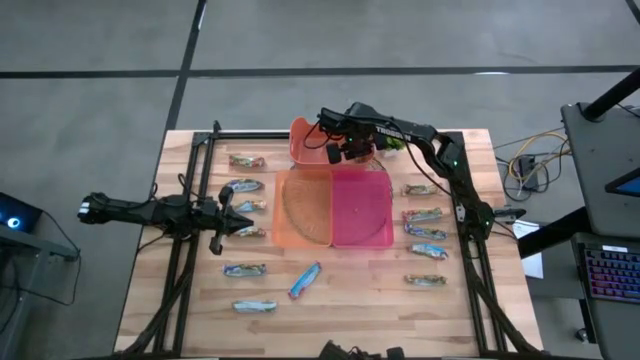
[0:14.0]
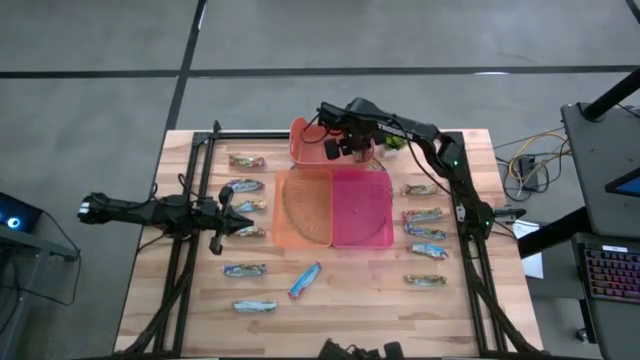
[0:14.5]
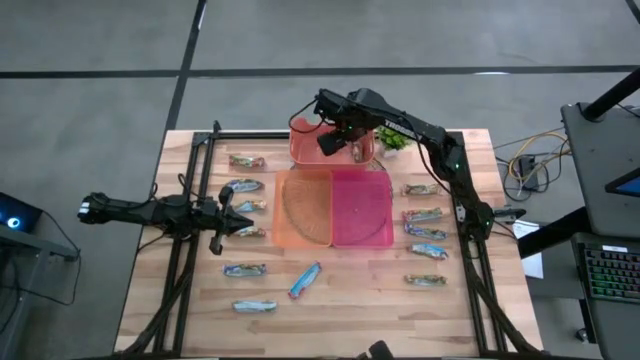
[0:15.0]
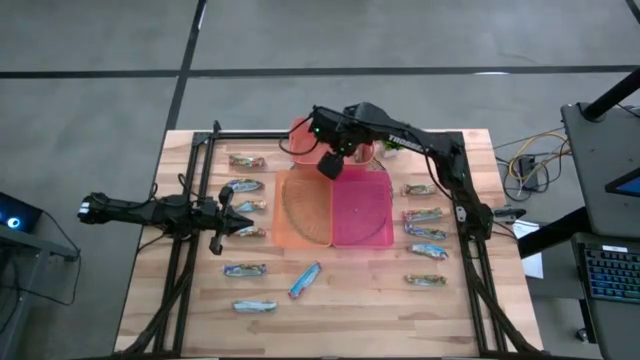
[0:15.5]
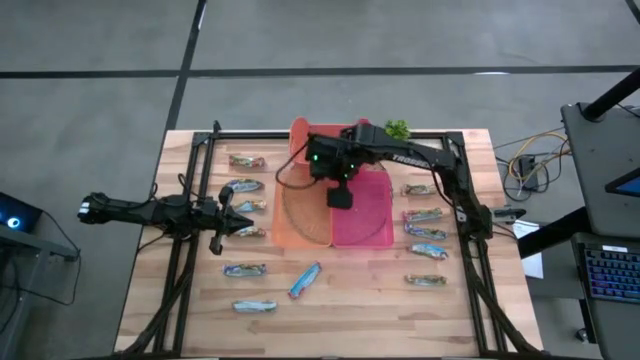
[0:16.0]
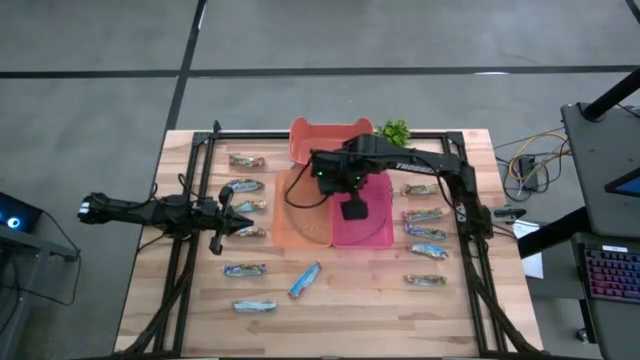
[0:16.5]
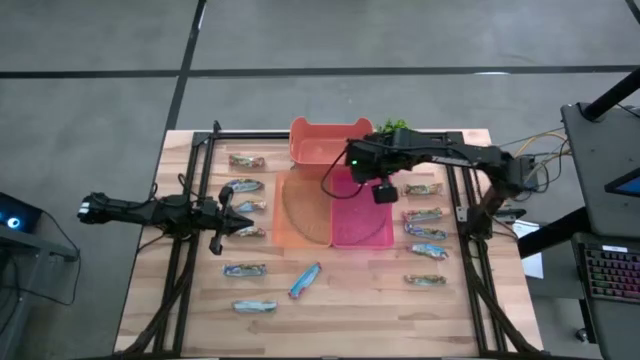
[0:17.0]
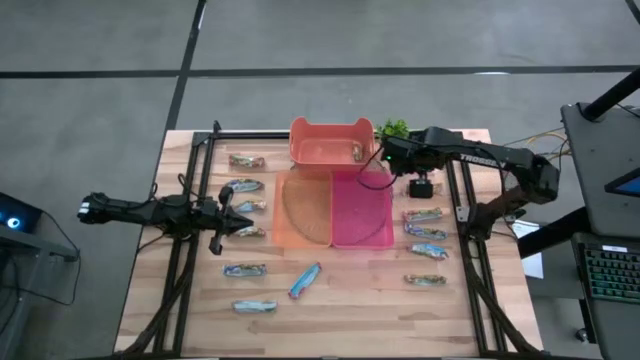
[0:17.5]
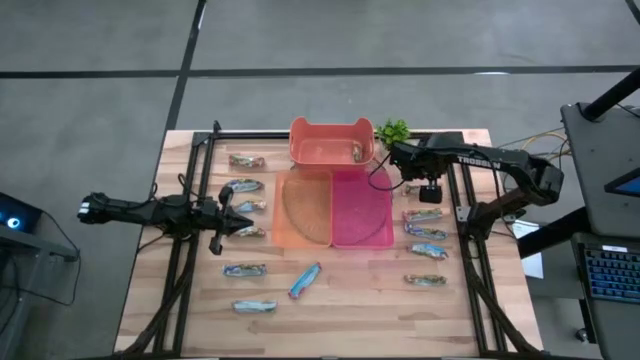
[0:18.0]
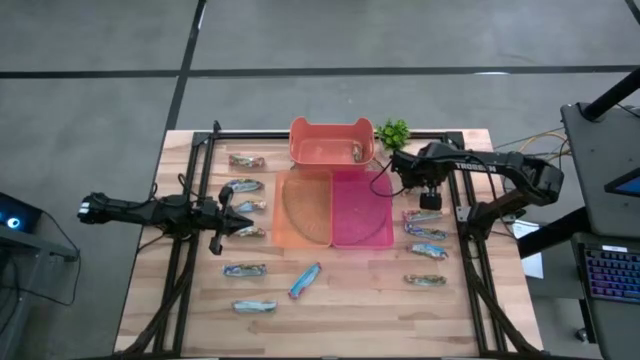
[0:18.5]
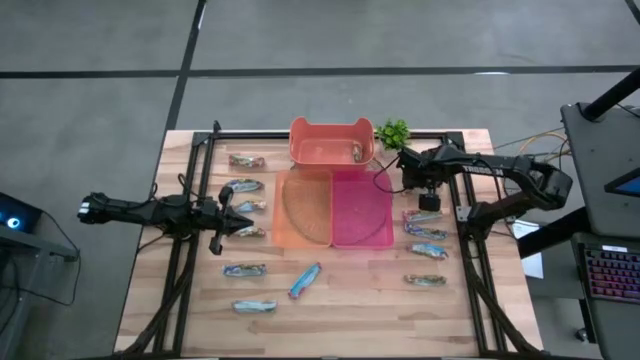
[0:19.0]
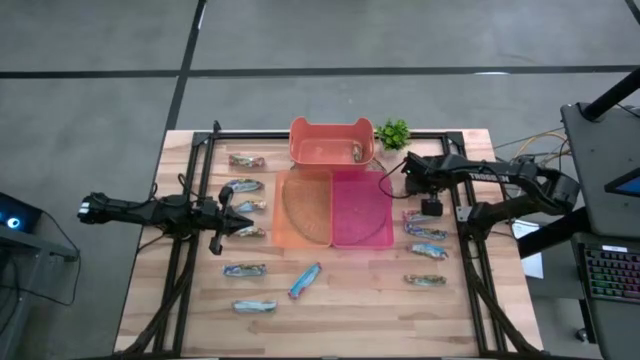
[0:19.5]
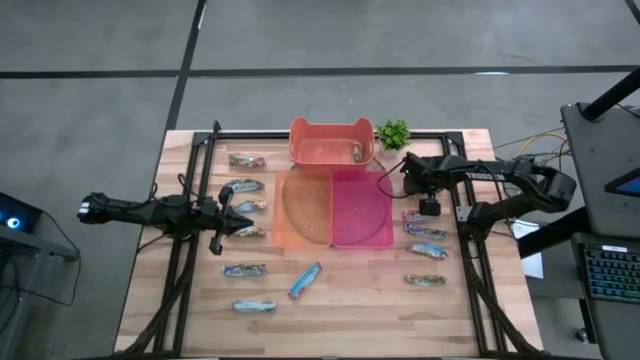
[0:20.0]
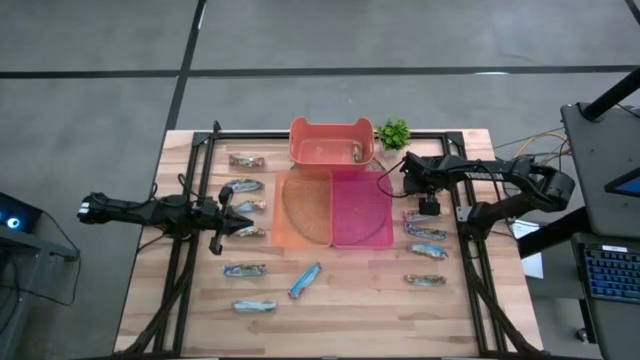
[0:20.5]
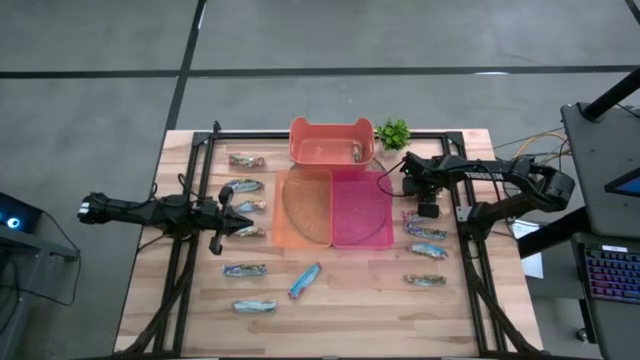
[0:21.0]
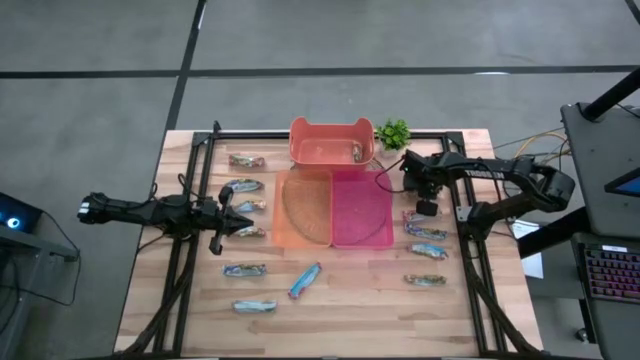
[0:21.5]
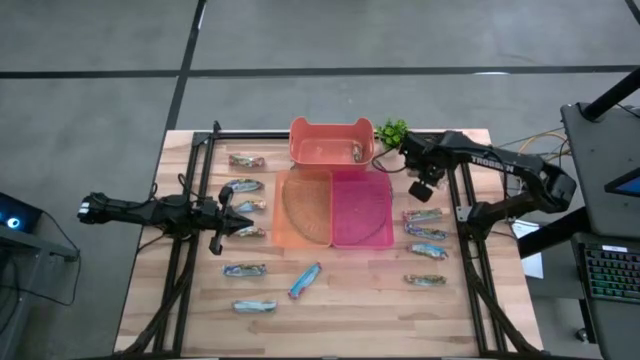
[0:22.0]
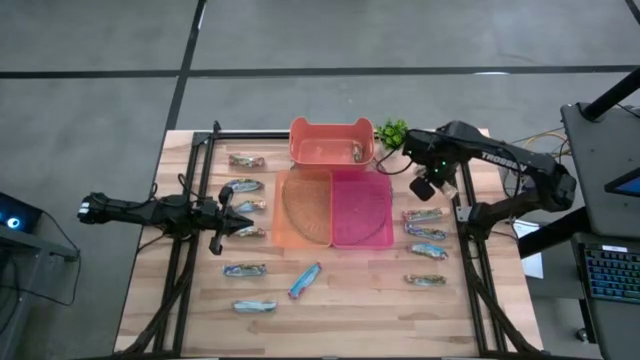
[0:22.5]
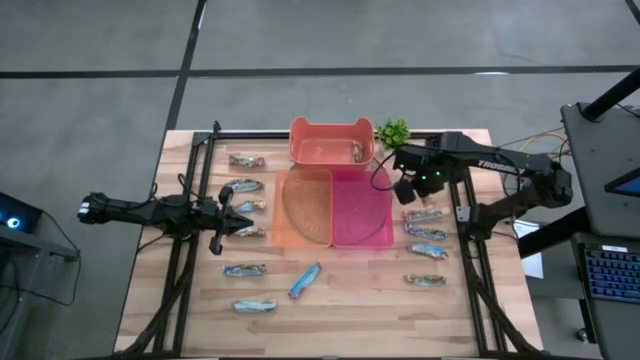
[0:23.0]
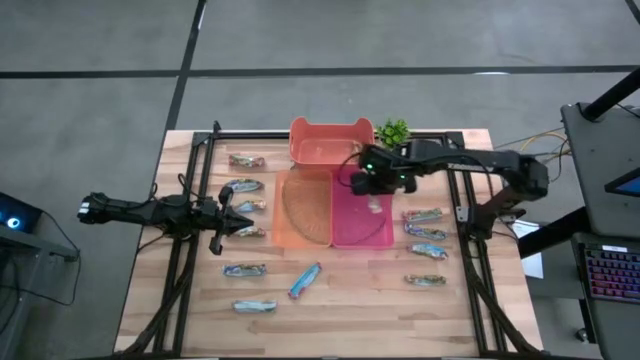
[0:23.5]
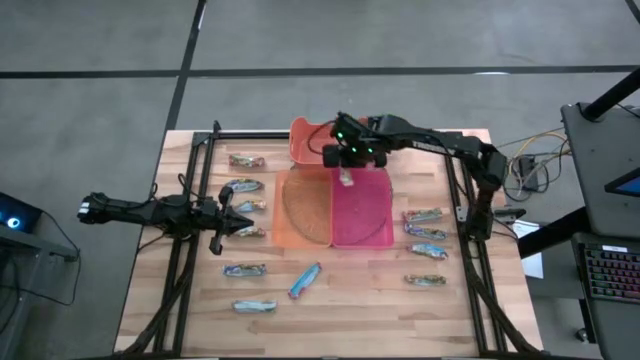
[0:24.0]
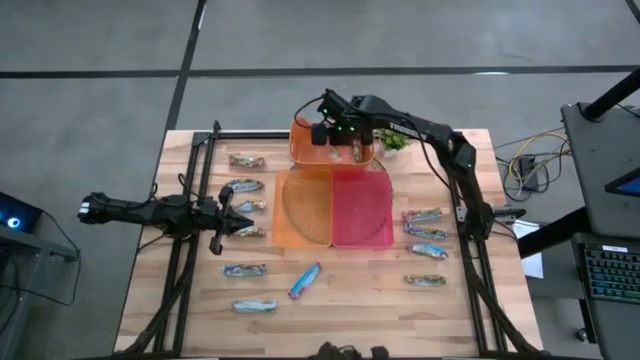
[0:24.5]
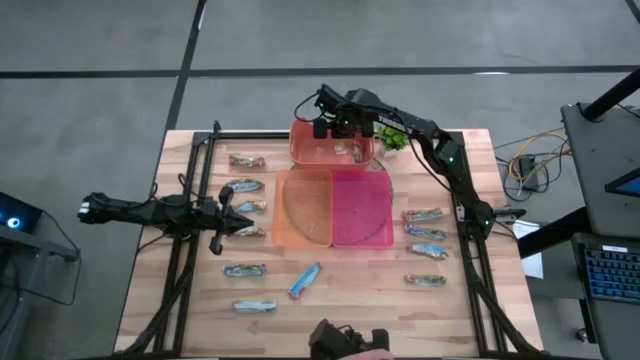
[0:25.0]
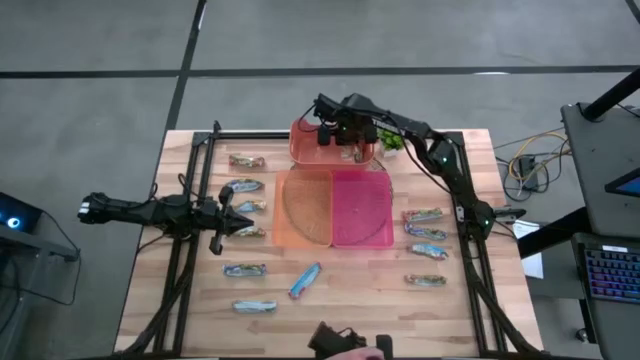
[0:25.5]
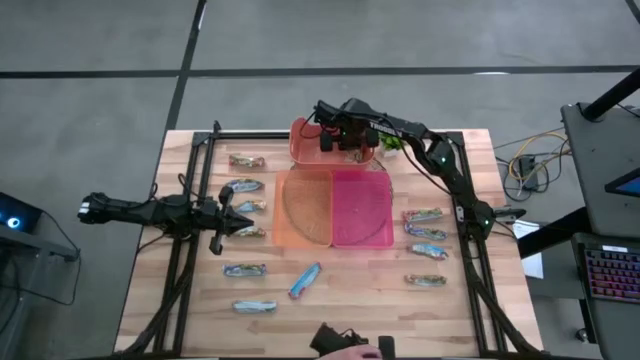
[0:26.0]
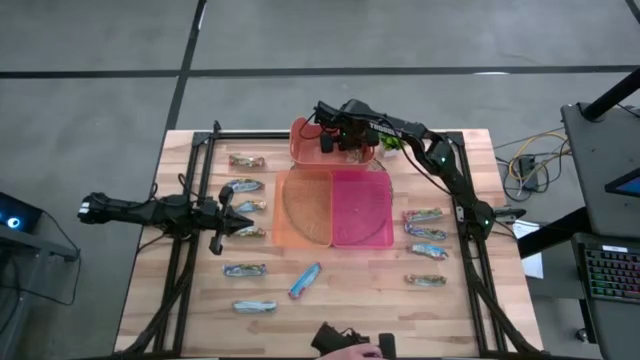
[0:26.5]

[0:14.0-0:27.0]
Task: Pick and place Granola Bars by type
Put the yellow granola bar into the orange bin

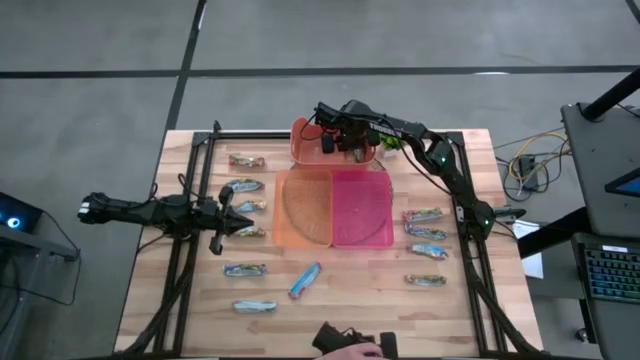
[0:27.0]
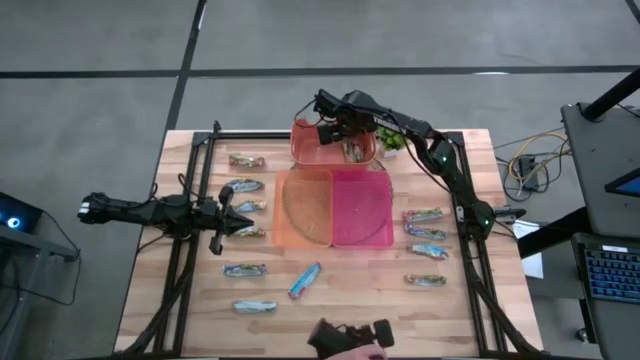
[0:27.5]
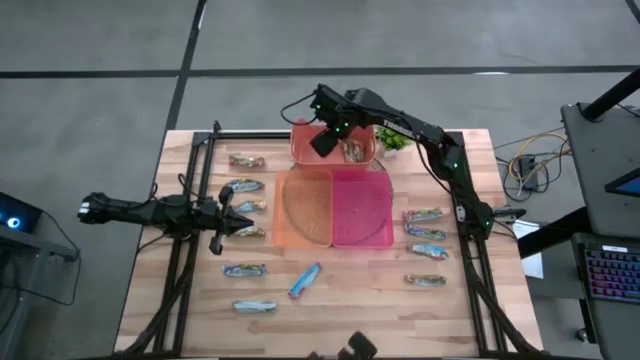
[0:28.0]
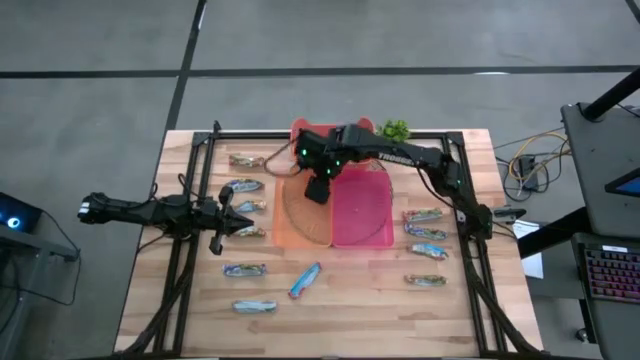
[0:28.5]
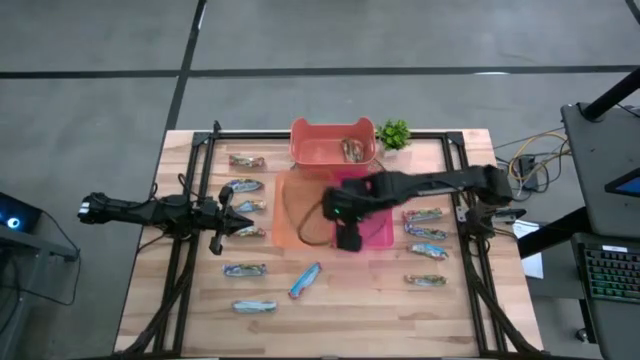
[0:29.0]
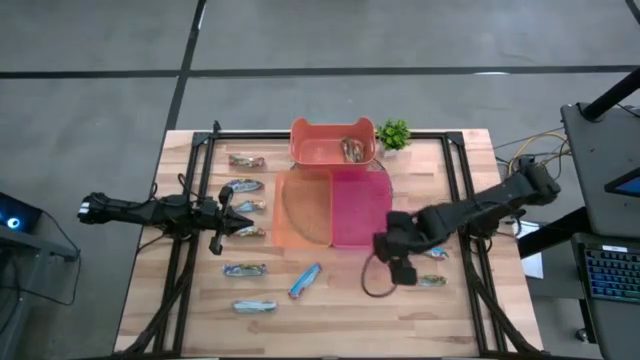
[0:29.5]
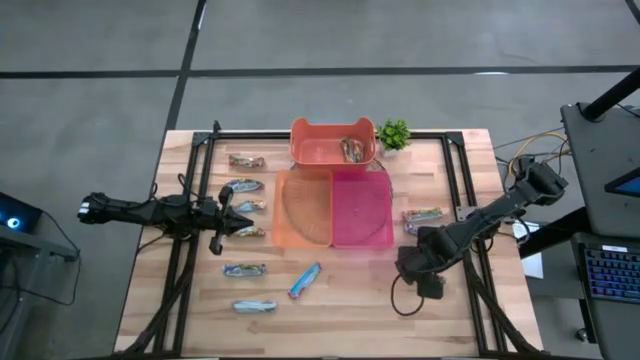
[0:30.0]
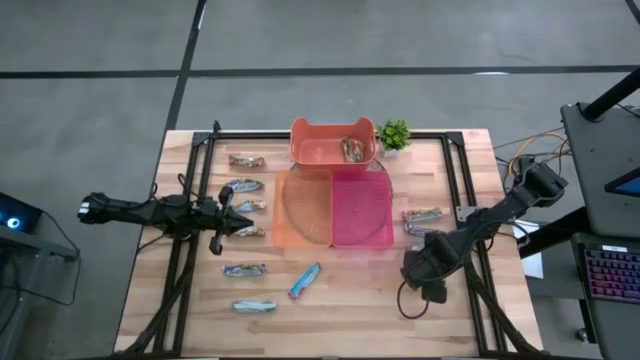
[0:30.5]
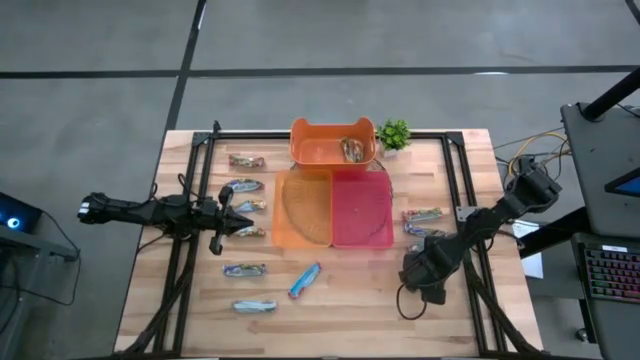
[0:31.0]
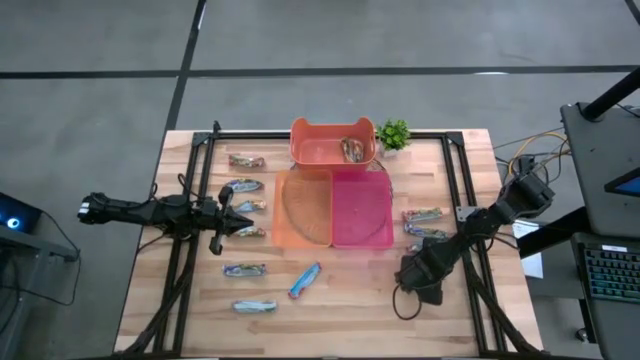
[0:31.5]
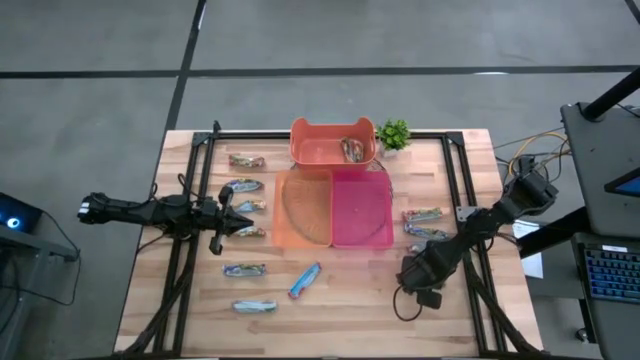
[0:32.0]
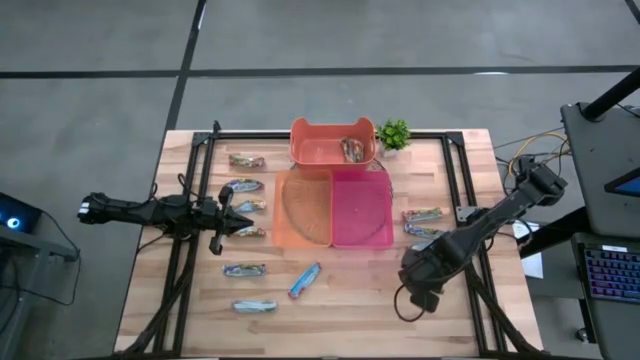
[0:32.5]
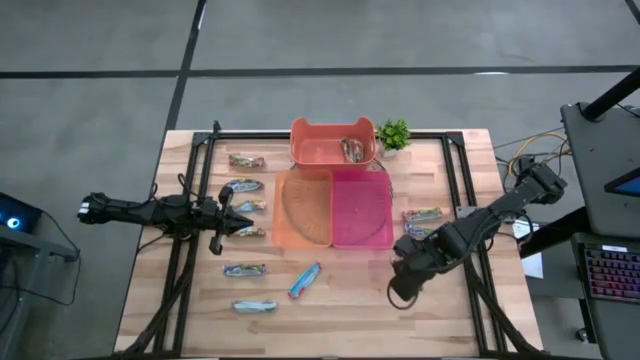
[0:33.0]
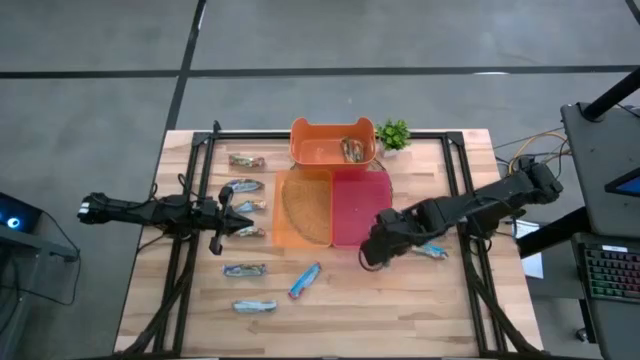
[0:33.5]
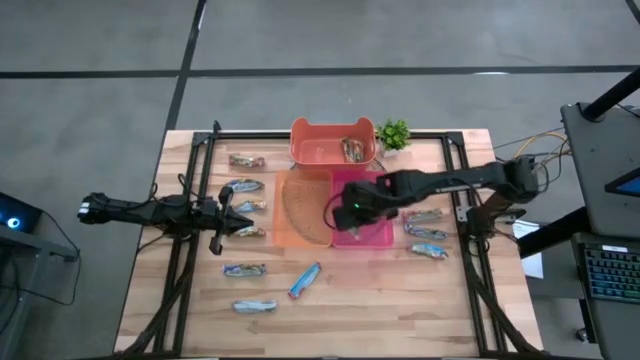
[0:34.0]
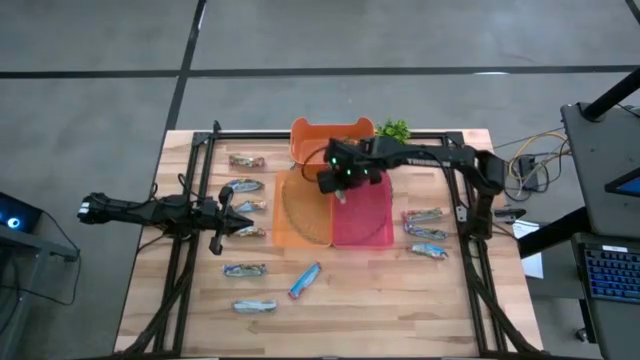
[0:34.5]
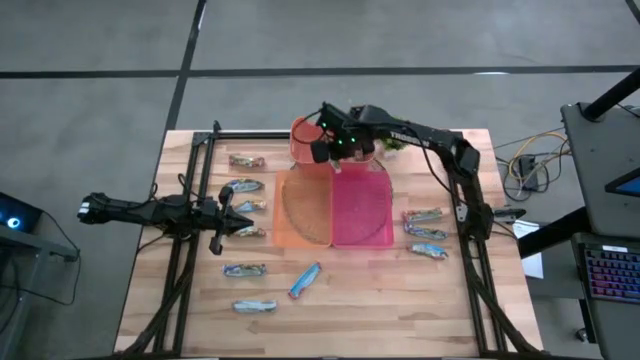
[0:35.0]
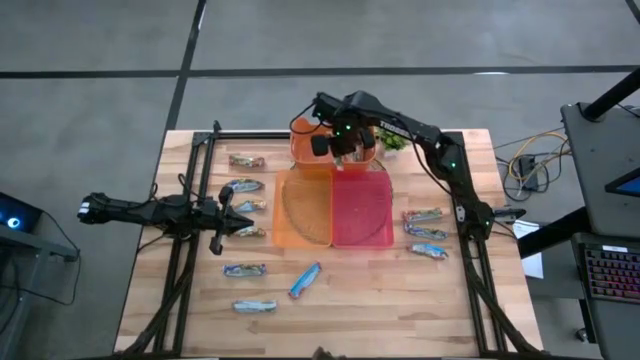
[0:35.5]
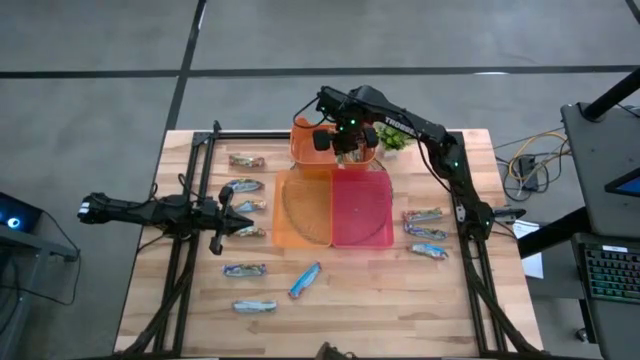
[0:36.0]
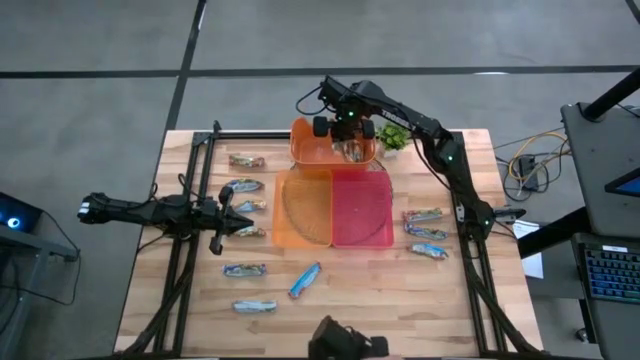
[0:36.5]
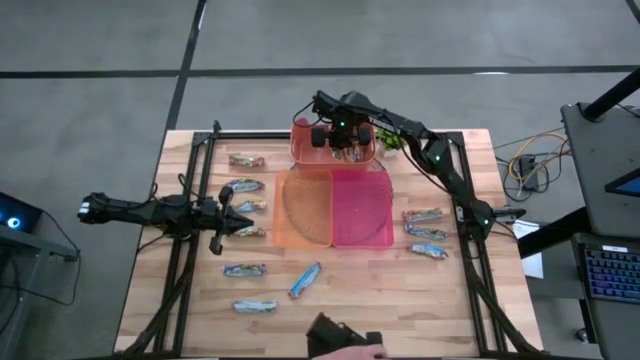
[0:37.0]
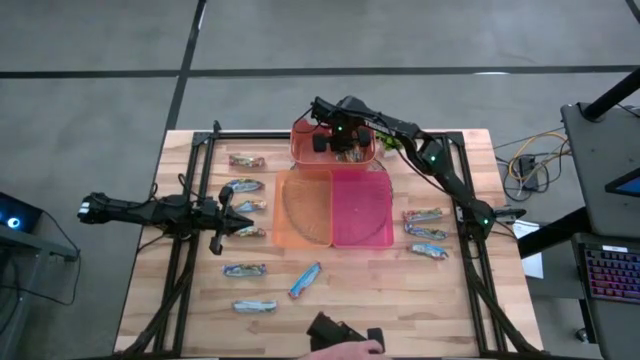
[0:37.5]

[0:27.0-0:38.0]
Put the yellow granola bar into the orange bin
